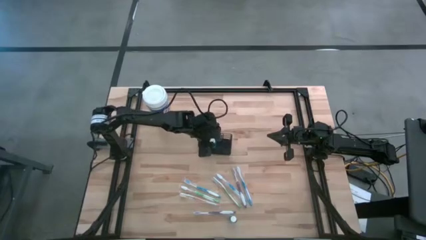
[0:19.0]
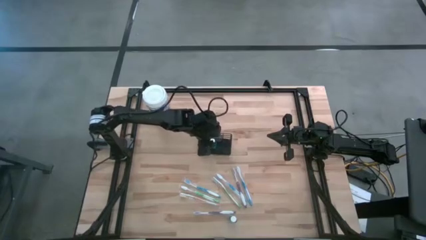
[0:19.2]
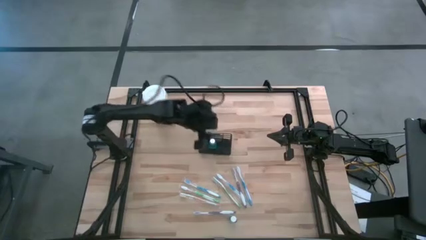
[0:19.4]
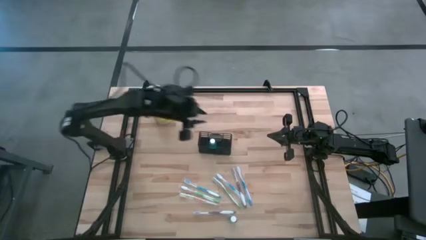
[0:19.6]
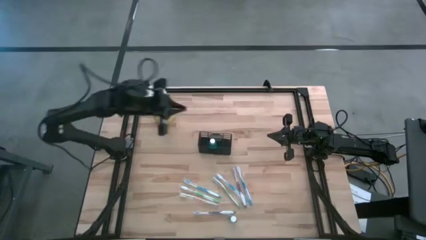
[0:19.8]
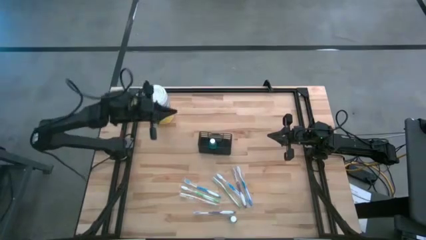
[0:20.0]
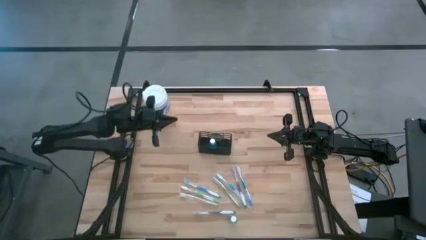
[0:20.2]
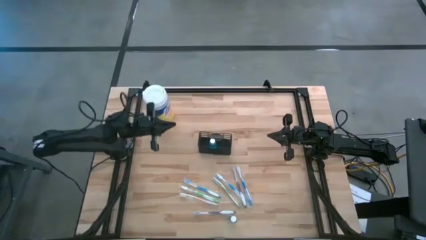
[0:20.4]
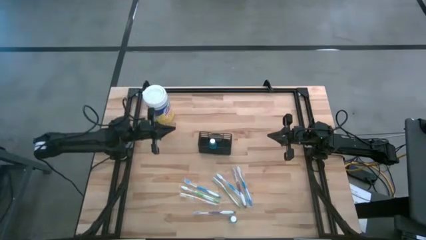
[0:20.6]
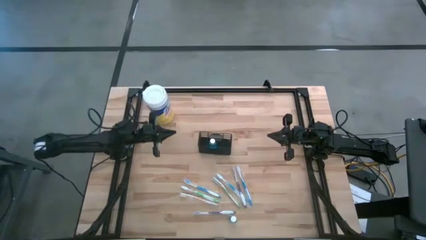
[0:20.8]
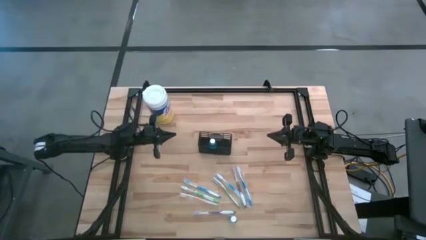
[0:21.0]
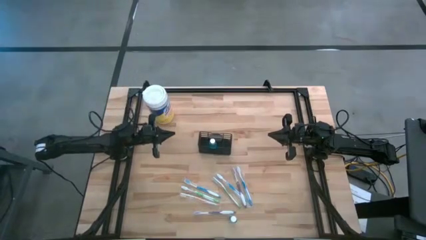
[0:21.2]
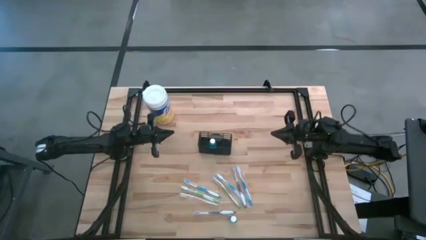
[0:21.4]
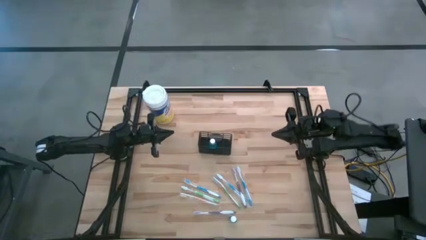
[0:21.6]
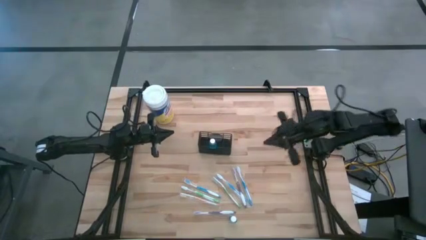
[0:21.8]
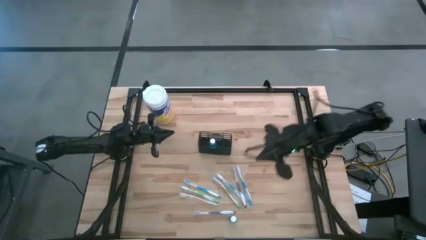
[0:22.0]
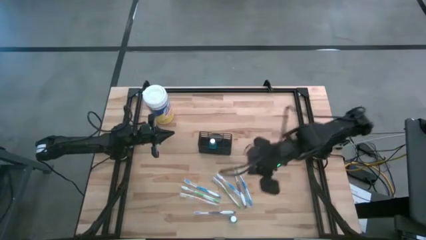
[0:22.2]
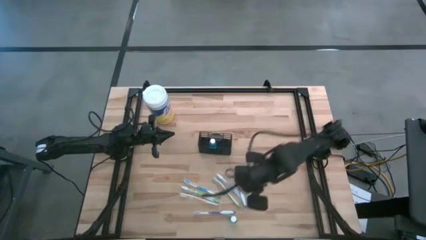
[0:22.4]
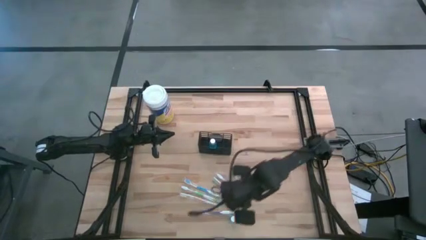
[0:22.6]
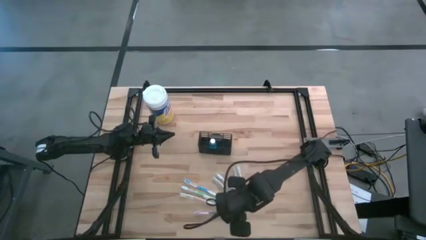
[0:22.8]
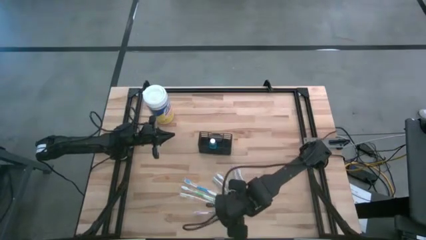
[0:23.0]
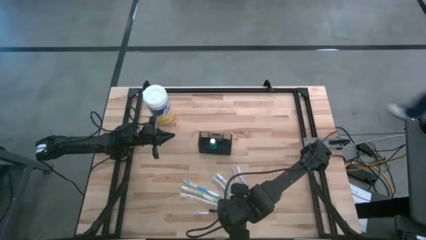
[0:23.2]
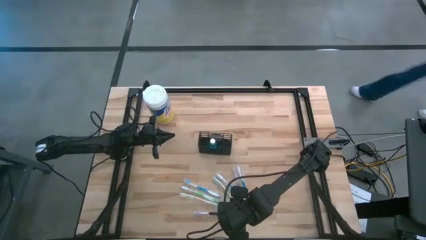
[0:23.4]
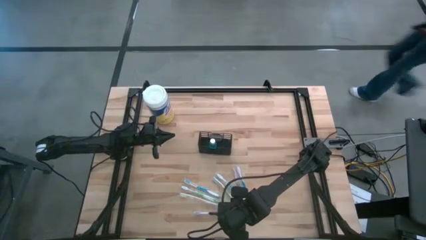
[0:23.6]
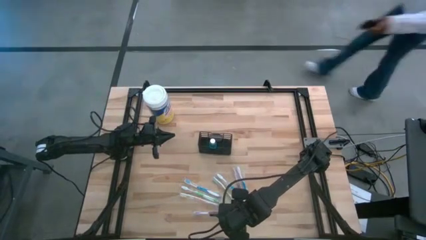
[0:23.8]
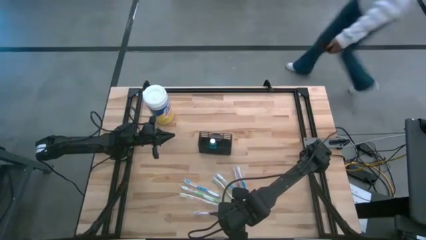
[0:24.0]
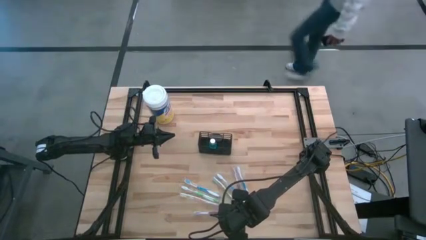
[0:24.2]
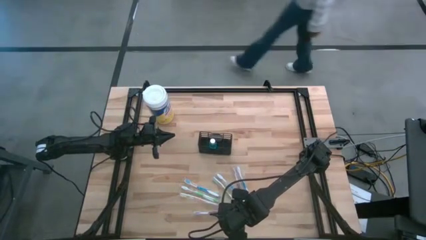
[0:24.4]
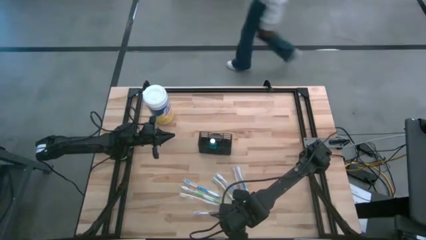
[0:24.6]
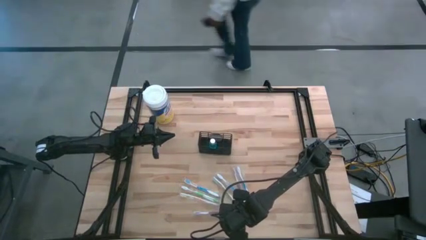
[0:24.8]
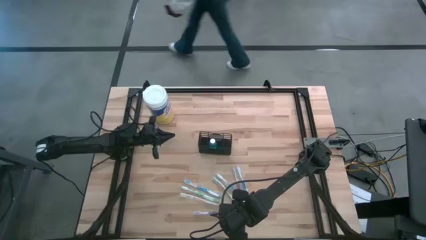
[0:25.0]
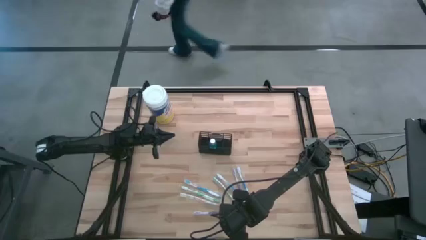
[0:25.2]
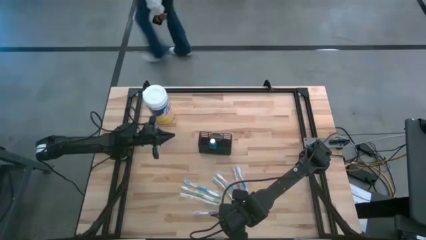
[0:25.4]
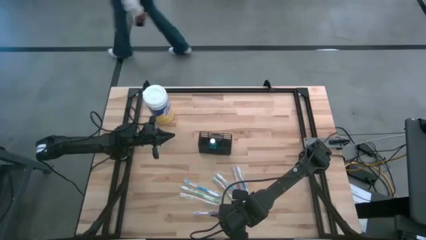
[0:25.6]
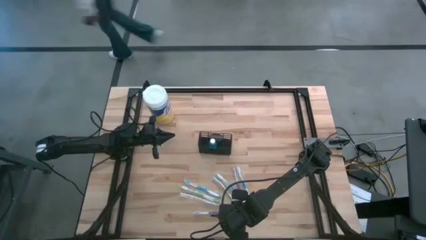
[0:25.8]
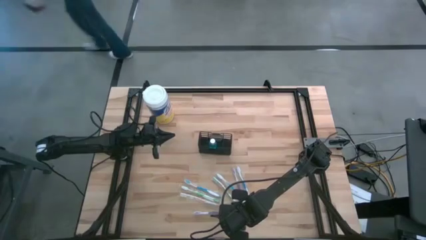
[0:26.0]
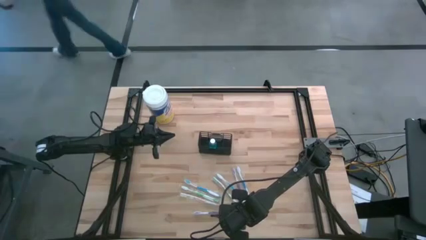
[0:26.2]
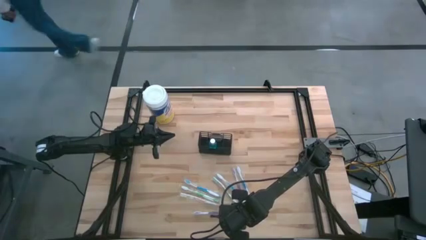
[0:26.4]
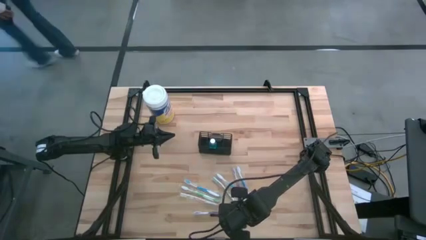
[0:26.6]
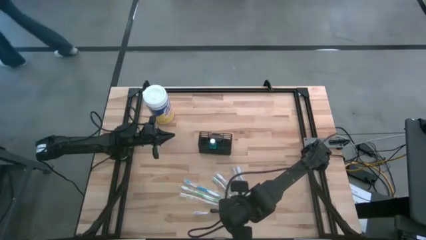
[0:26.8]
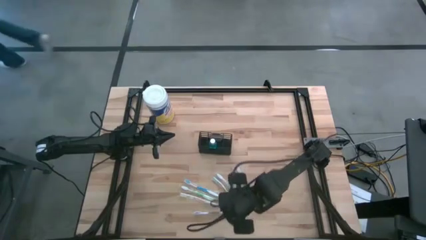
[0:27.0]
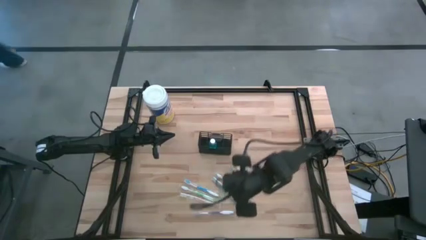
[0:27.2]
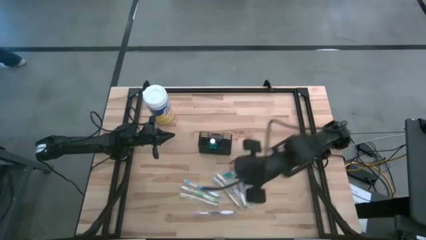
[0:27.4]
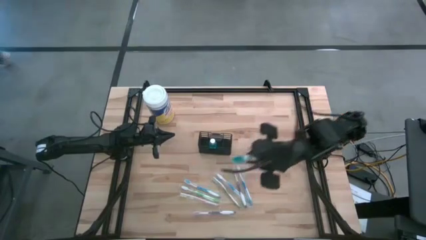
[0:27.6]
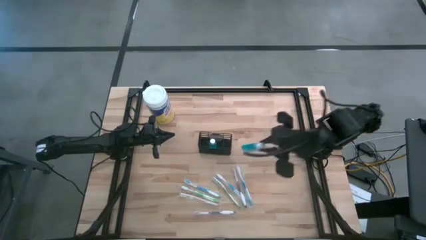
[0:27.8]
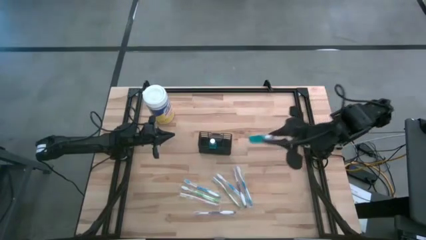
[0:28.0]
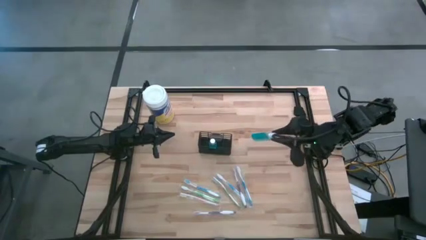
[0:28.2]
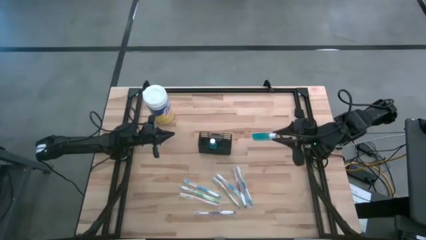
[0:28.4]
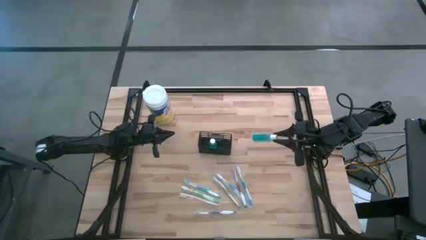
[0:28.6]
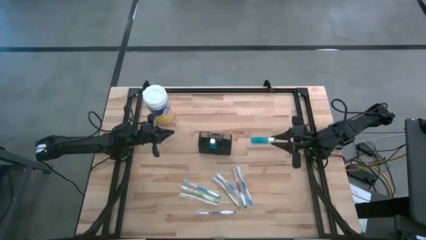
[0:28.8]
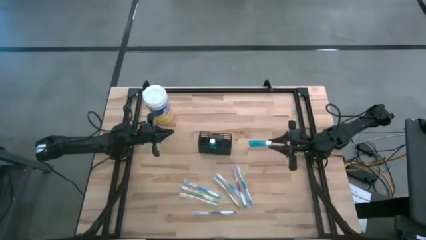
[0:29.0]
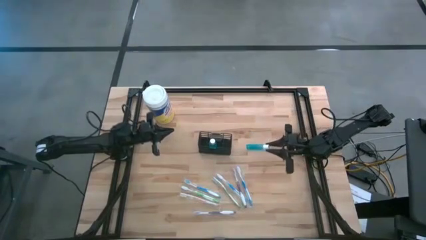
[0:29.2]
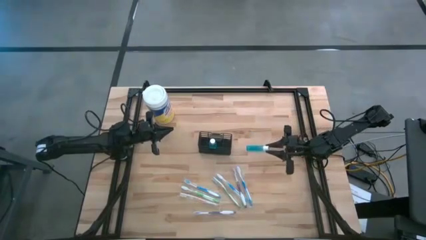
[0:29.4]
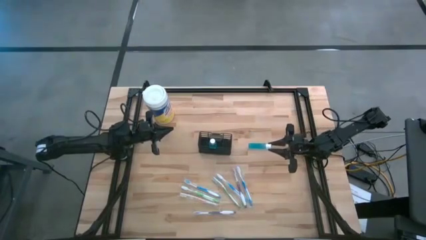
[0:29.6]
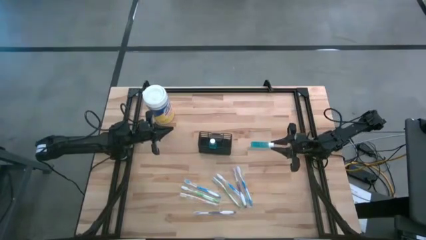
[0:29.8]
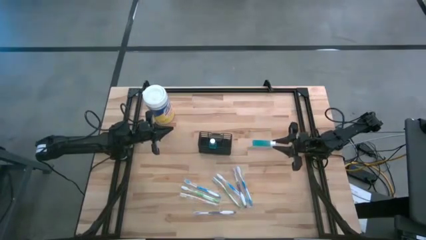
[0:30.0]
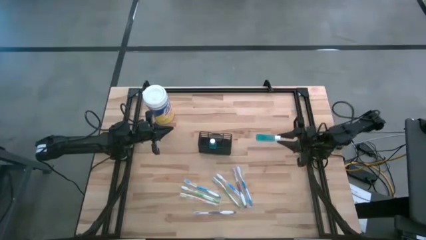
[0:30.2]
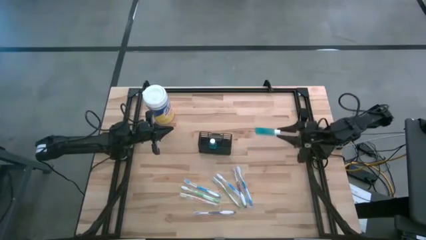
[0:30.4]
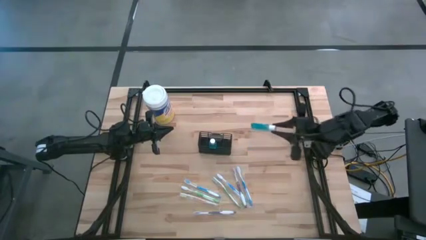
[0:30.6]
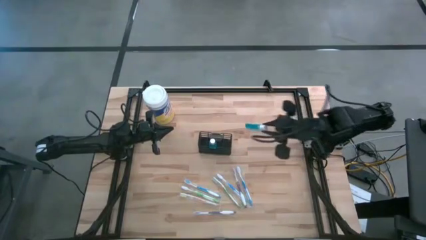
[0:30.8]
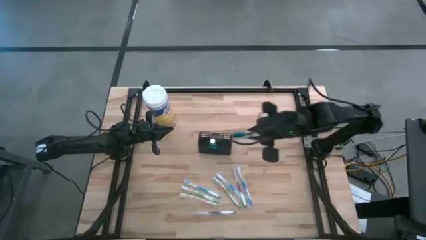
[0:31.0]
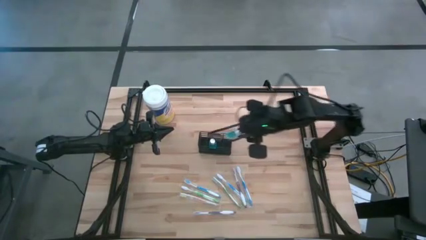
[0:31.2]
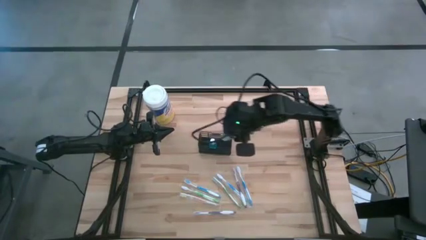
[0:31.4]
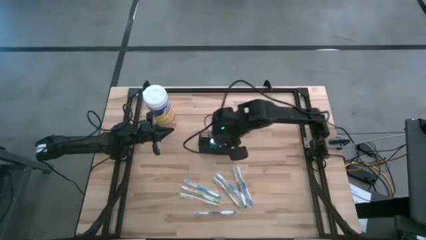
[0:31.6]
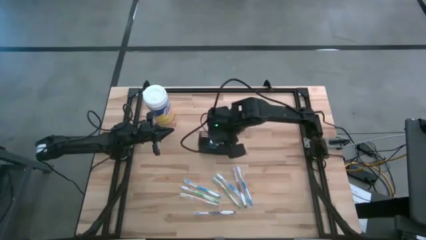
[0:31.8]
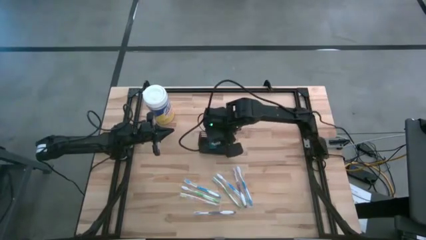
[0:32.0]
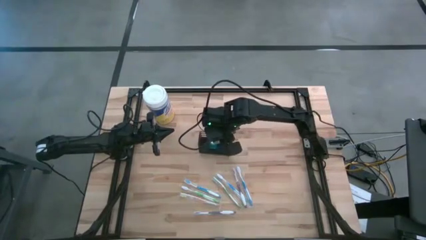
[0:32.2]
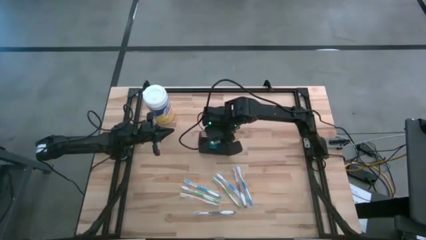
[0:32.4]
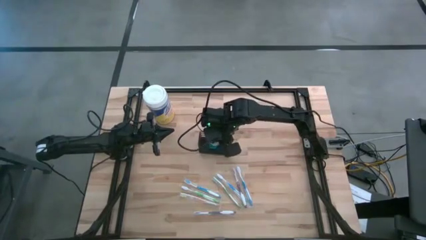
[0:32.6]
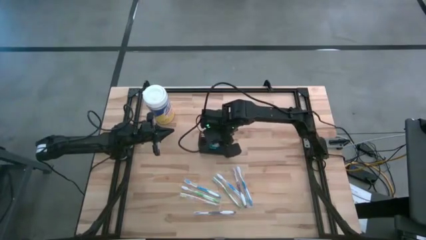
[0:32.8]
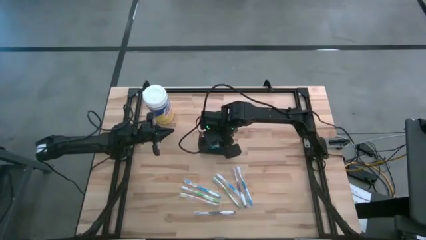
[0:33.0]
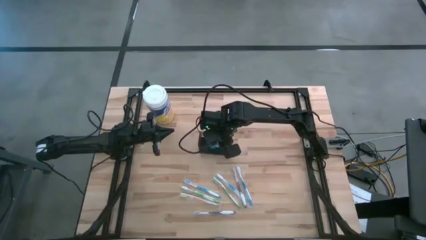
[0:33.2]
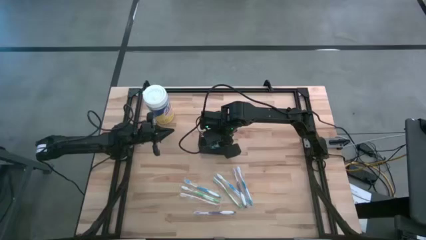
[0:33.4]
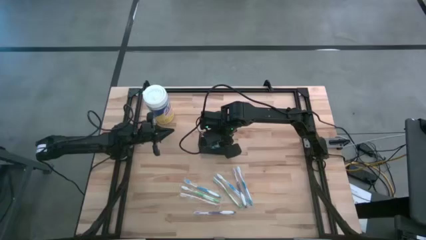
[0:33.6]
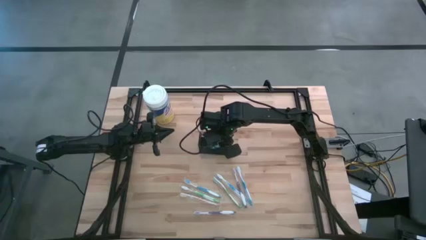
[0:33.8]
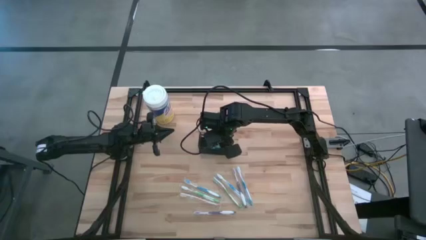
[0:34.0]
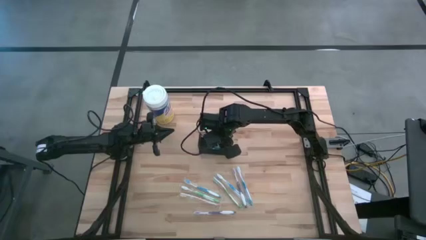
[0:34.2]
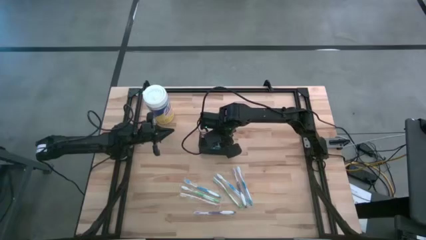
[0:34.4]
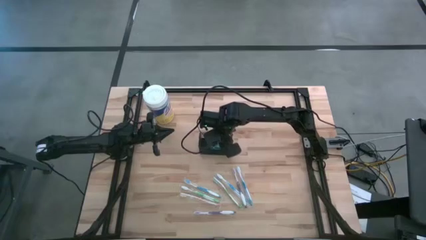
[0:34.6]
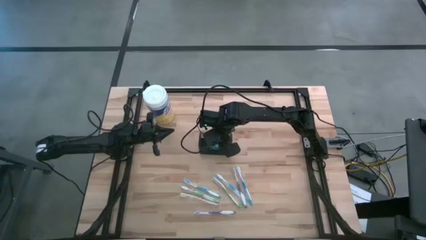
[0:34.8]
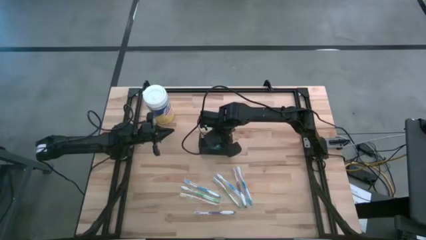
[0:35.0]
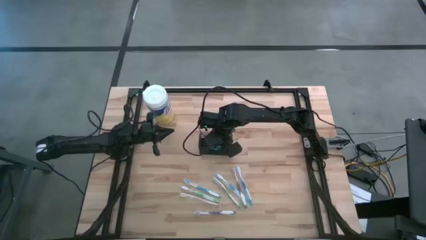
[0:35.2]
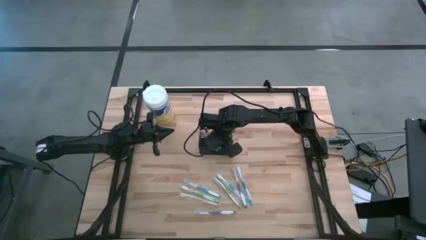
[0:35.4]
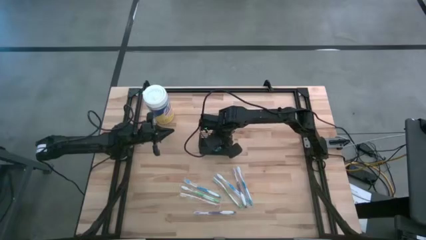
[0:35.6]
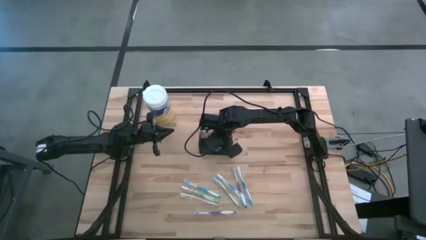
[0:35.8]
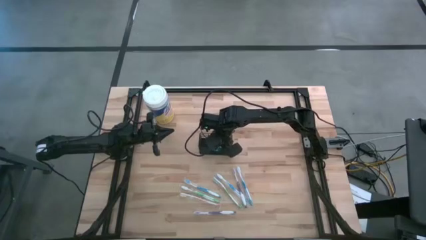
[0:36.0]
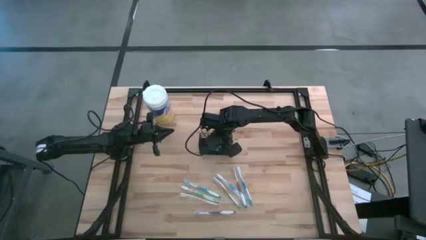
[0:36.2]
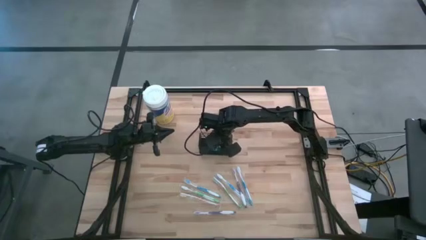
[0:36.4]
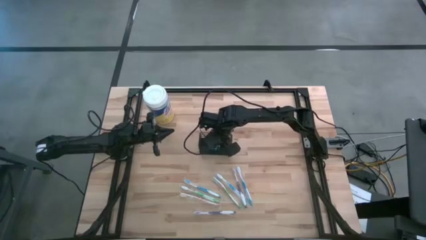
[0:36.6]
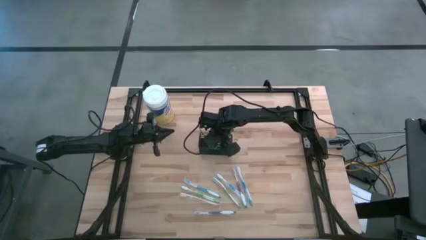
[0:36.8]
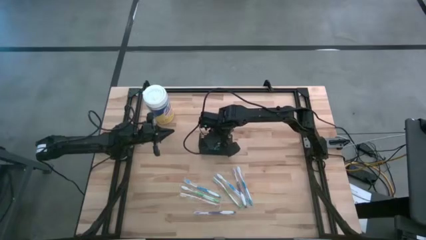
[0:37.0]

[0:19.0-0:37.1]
Task: Pick & Place toothbrushing station
Put the mouthwash into the mesh organizer
